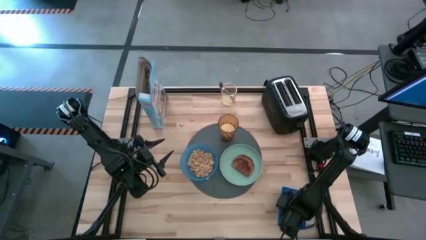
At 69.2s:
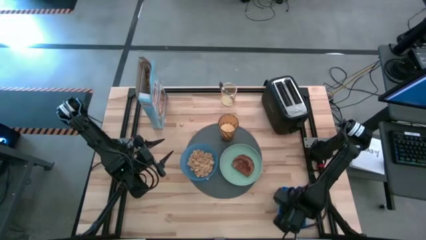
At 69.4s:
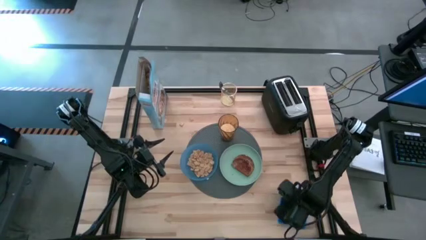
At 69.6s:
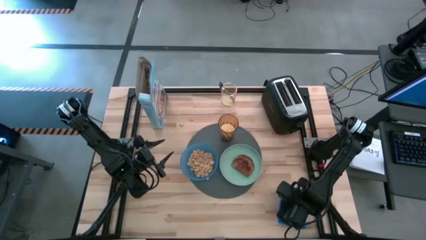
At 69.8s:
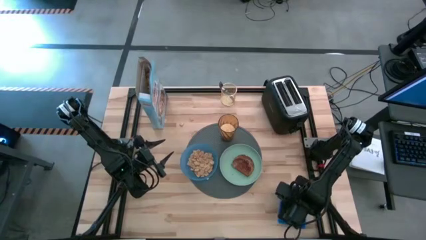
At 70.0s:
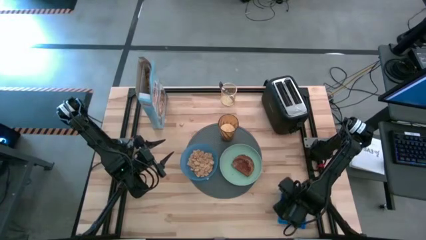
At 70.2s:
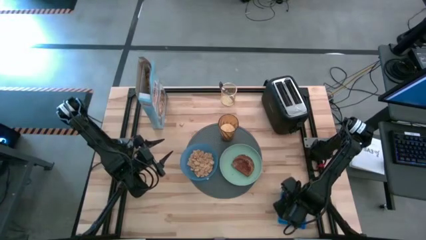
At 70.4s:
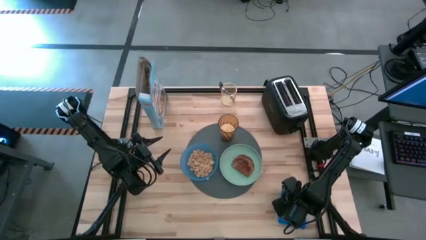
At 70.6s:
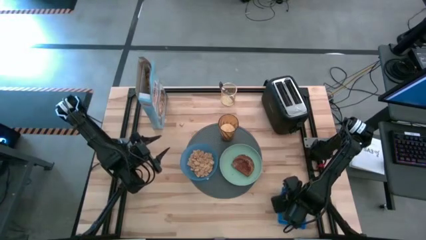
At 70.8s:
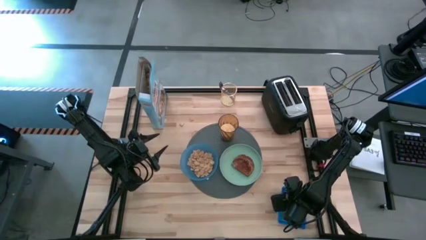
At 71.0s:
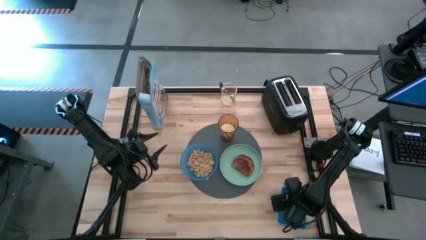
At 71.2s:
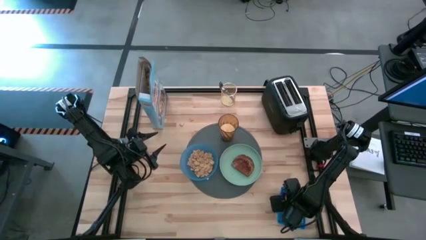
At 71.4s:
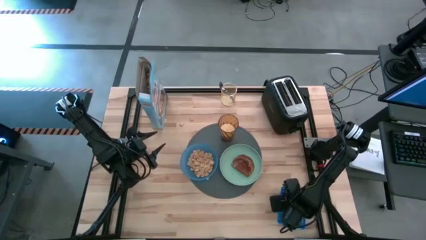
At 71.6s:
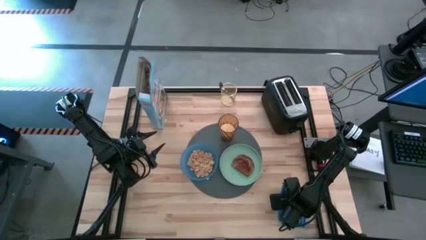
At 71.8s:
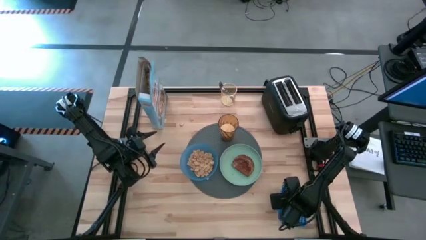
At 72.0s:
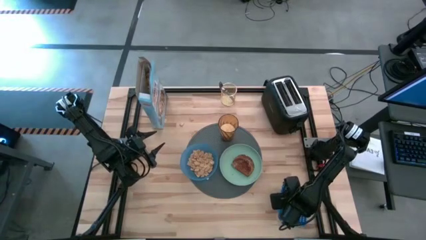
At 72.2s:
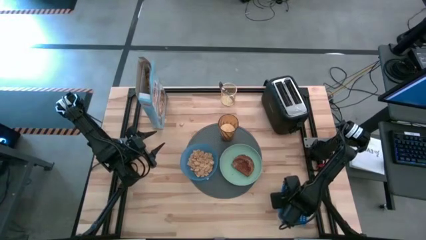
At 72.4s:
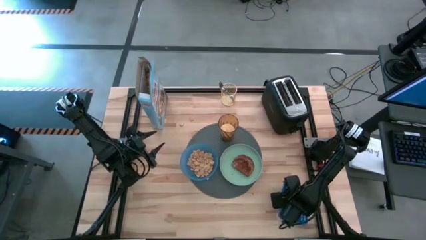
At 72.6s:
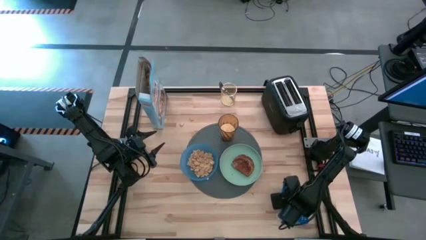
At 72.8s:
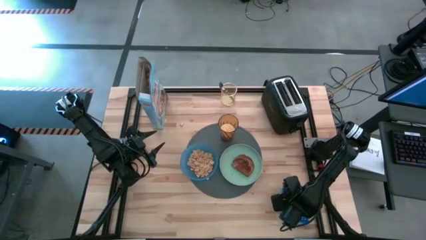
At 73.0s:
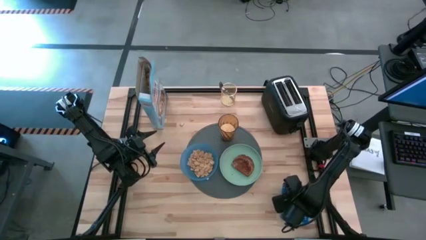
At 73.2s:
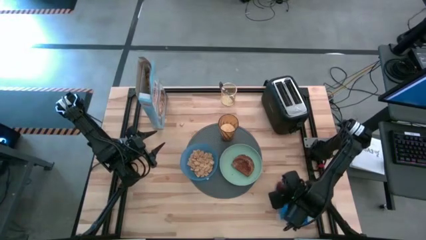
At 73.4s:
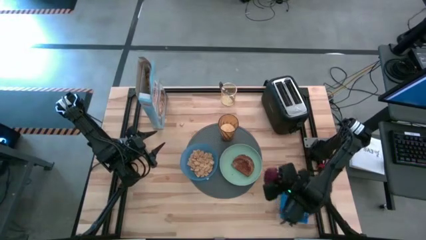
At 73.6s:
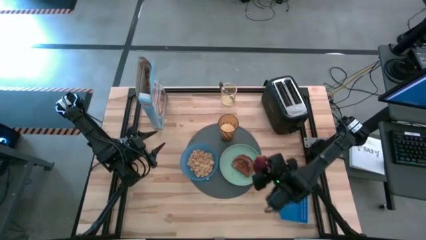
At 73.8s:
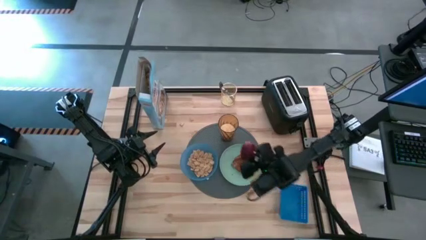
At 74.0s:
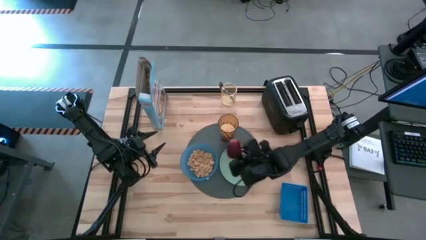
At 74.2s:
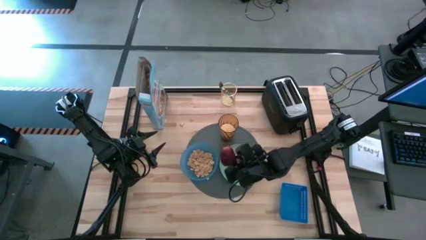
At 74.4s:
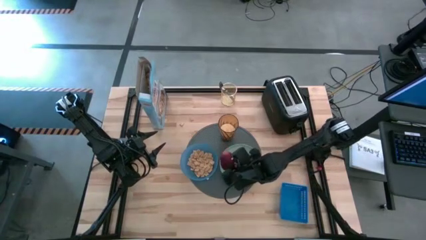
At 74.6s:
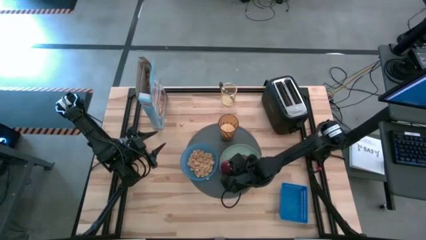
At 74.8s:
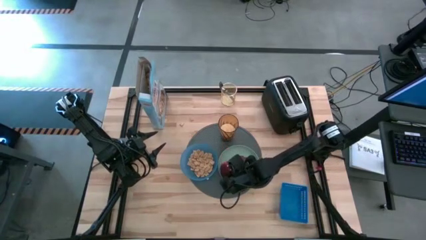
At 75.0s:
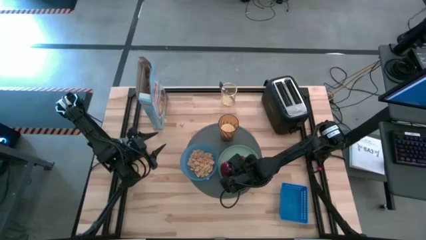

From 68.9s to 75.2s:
Task: Arrange a breakfast setting
Put the red apple on the light green plate

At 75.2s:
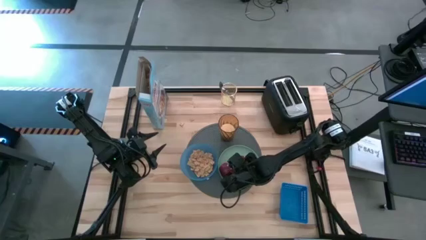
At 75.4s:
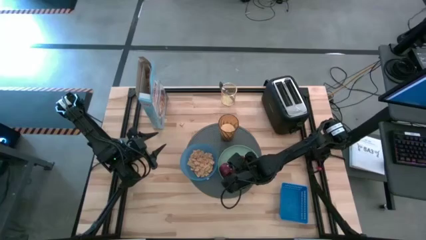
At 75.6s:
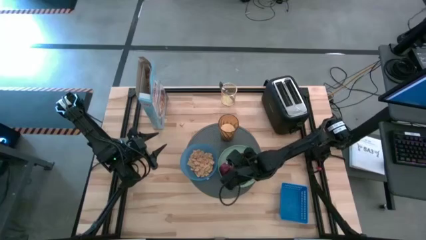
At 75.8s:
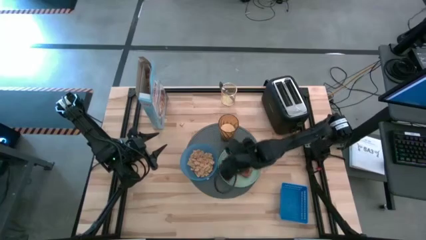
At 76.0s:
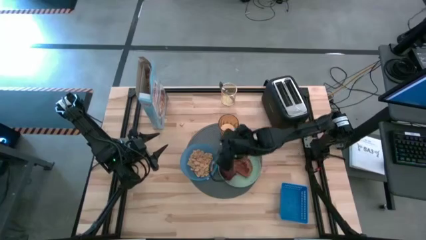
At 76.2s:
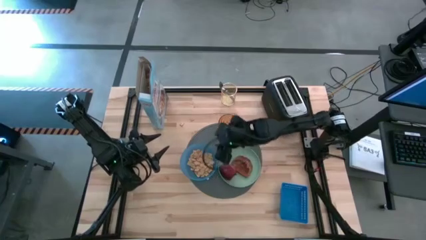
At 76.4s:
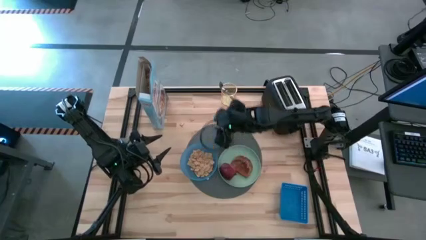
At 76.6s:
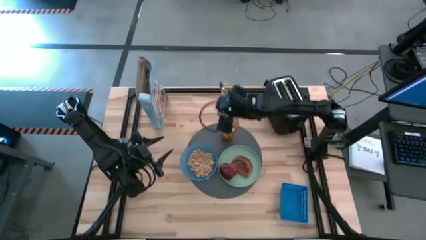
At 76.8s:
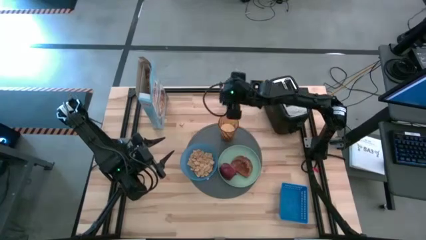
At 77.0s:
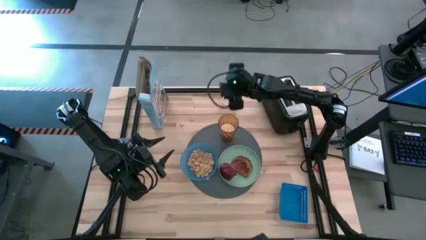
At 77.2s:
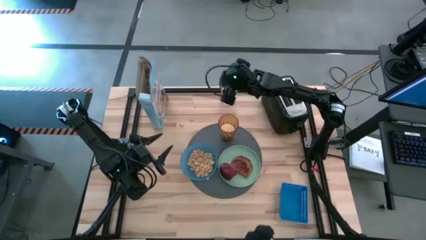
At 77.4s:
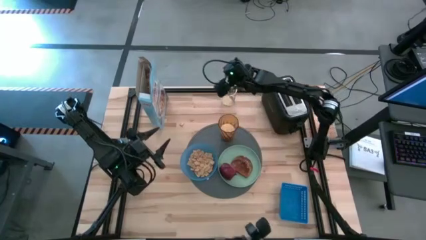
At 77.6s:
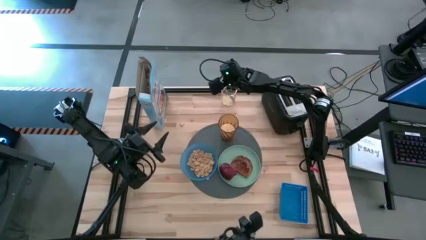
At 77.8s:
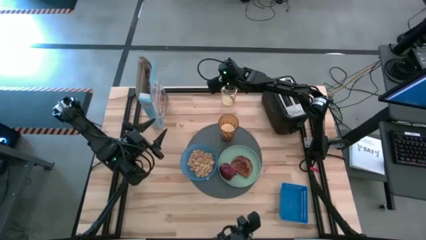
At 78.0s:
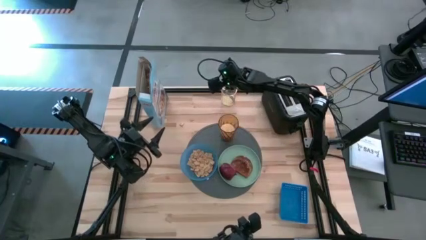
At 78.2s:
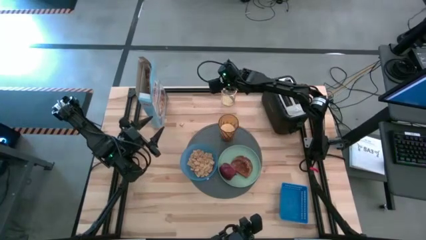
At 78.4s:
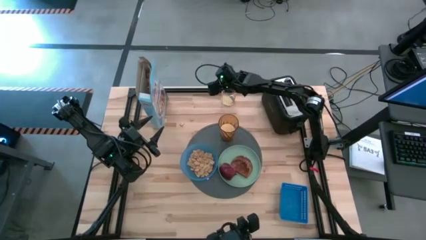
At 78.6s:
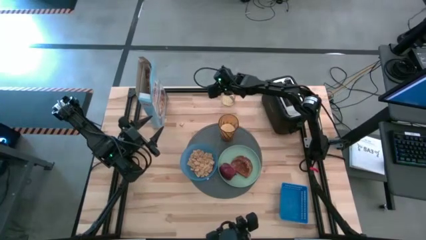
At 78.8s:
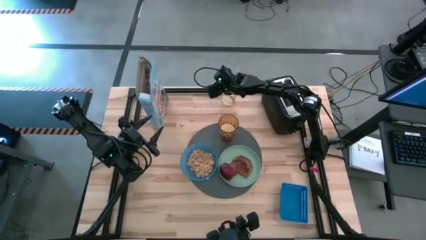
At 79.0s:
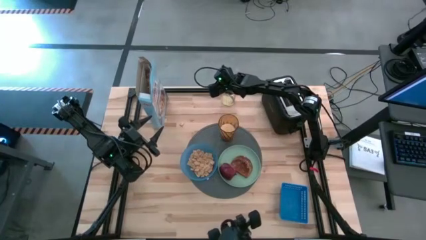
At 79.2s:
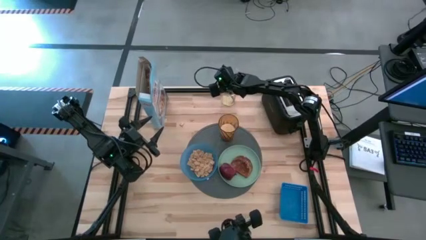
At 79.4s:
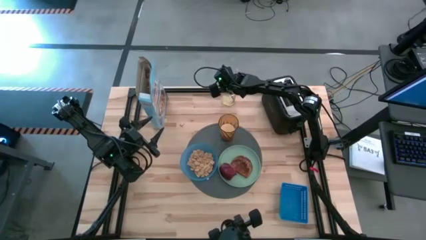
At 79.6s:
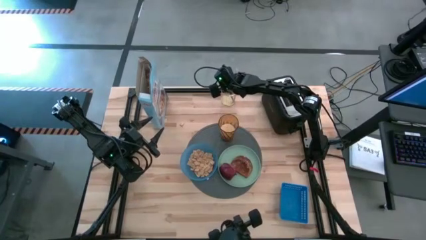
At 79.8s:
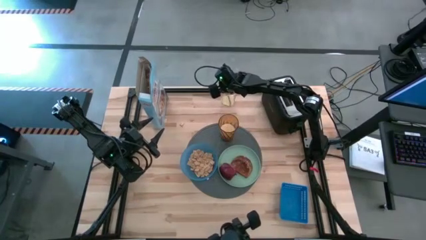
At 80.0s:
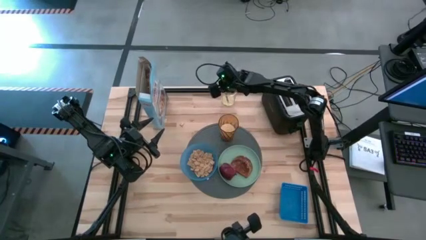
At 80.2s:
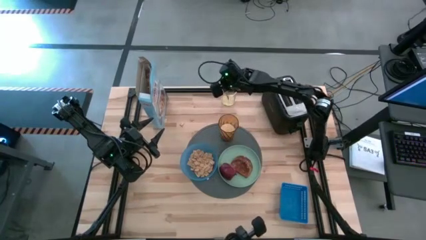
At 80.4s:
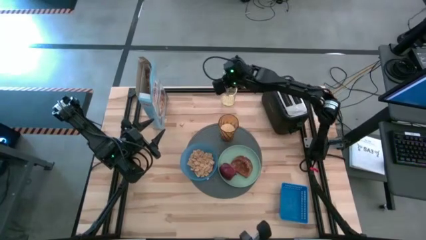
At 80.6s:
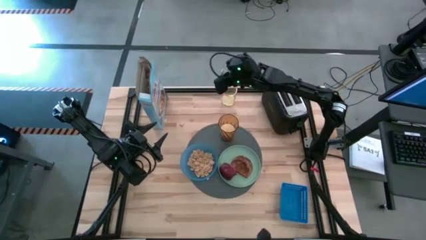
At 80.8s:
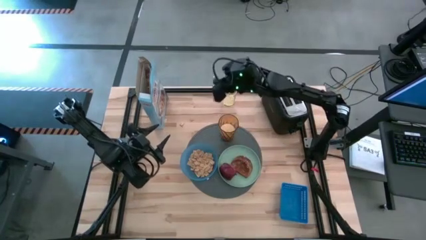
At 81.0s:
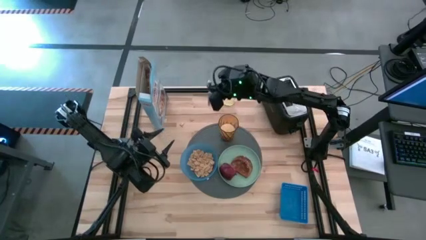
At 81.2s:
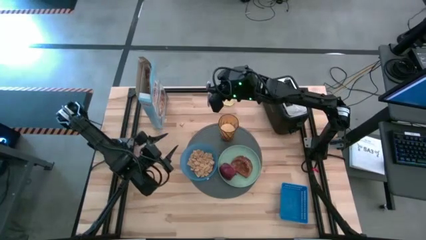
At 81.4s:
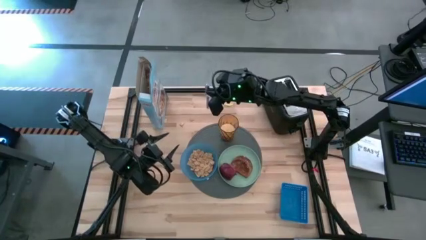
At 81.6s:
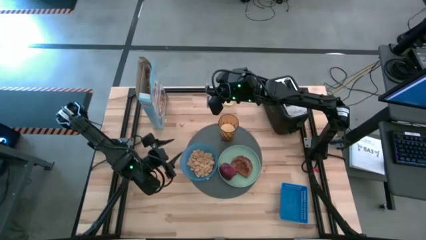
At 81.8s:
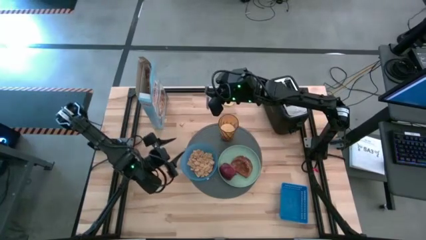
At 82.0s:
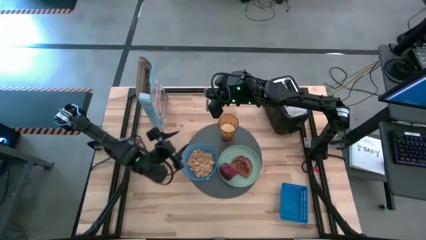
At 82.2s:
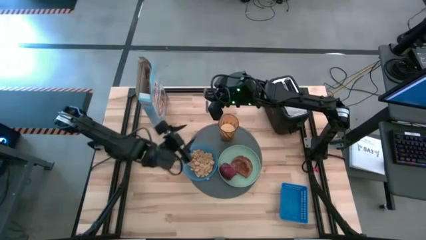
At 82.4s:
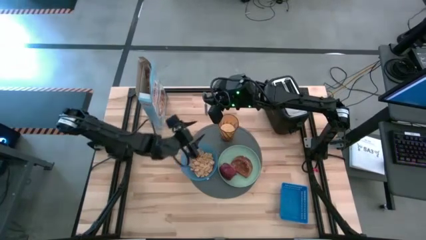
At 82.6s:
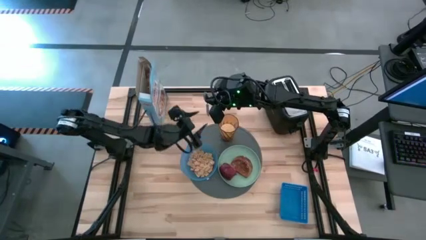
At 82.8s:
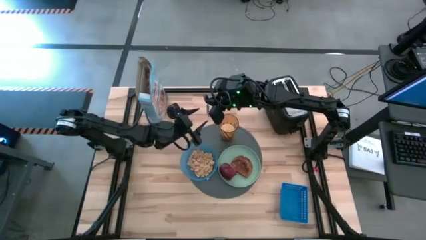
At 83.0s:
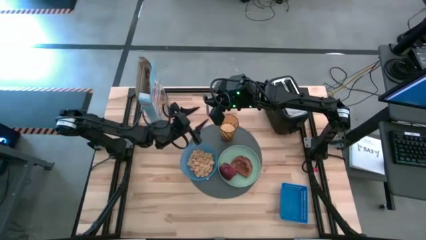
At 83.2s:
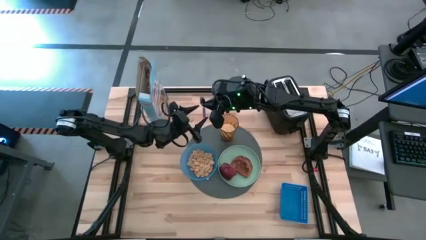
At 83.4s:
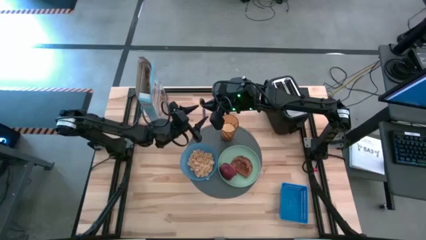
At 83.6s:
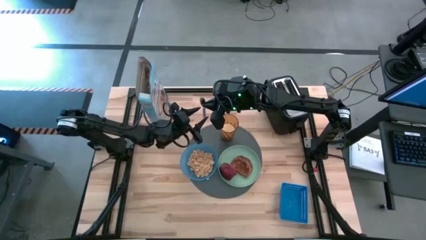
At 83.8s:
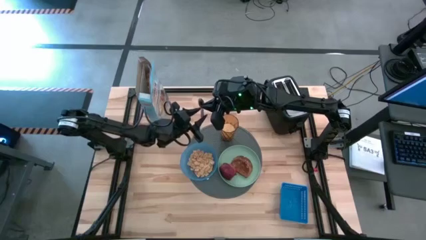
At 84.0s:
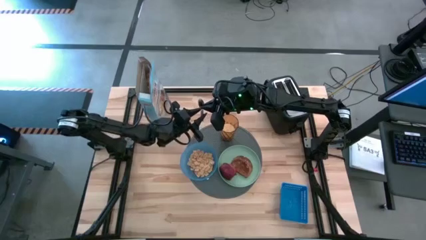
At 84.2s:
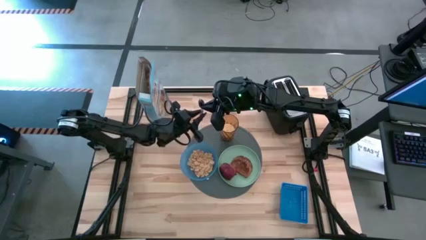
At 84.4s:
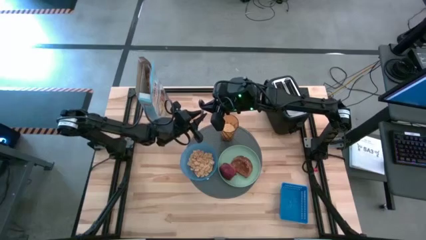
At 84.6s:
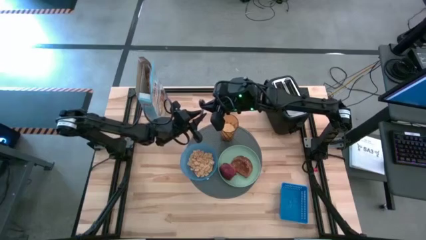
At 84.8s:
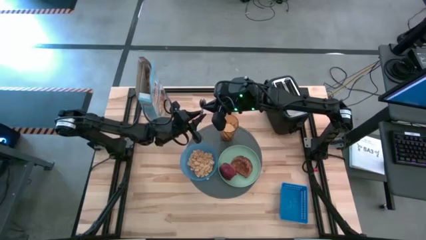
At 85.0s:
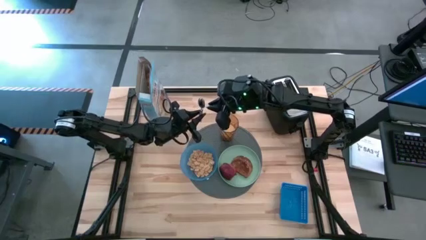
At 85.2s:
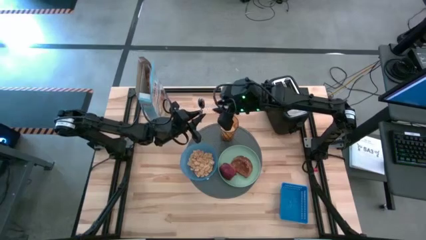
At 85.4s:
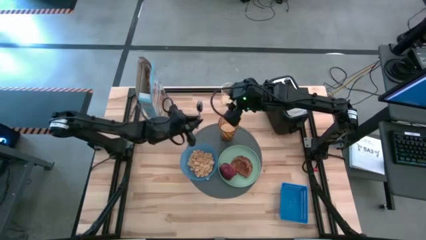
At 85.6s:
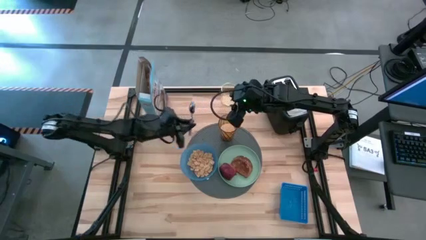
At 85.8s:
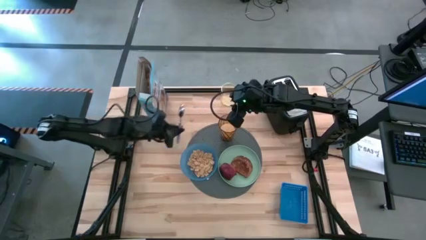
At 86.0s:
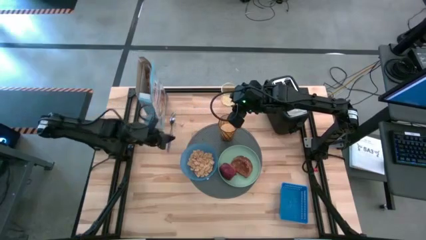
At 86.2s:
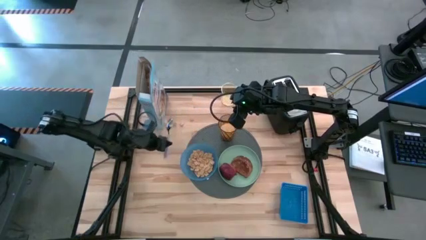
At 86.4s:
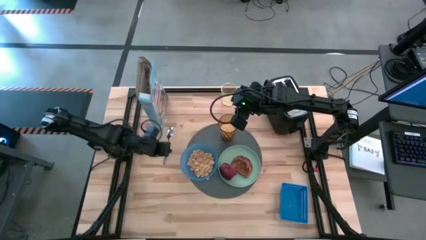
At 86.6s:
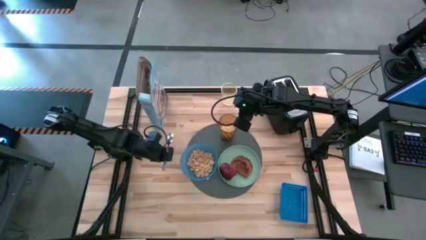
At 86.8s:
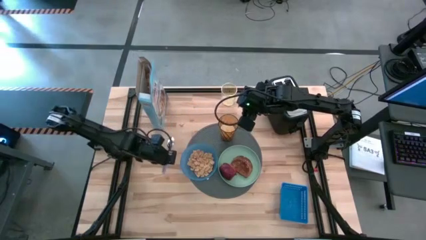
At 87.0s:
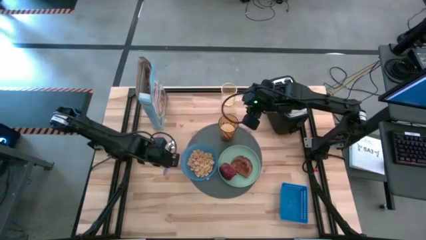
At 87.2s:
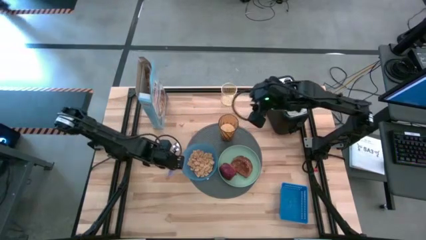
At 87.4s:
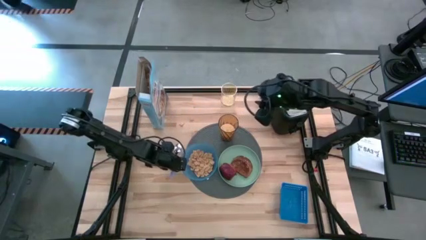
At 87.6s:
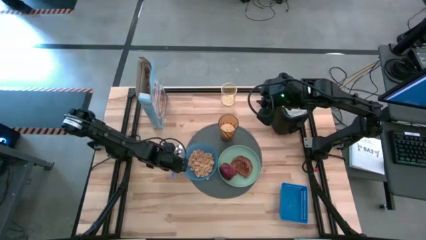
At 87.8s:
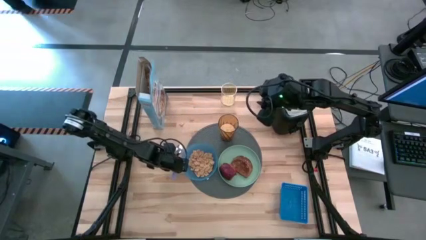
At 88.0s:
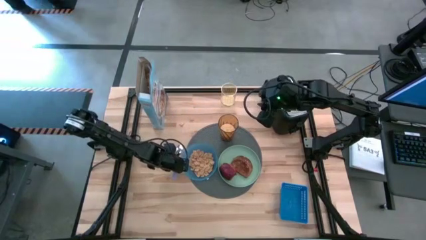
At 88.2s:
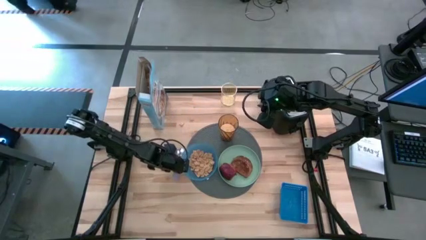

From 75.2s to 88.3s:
Put the violet spoon beside the blue bowl
